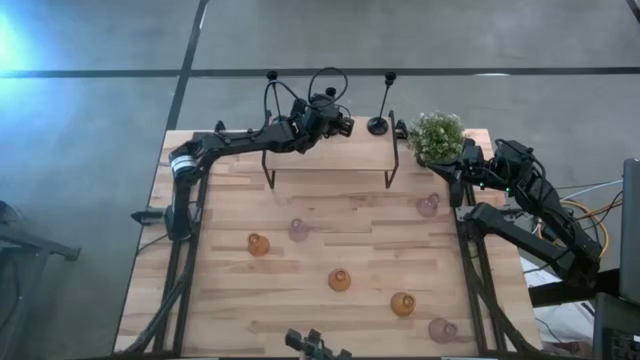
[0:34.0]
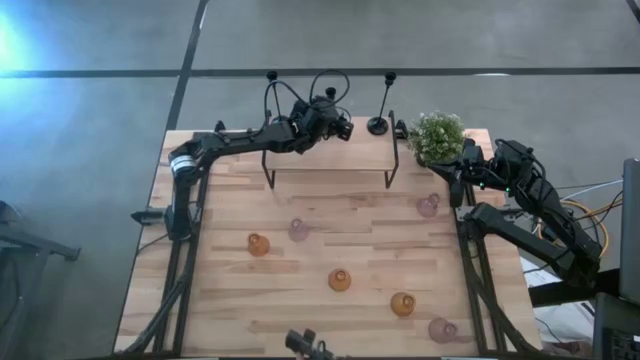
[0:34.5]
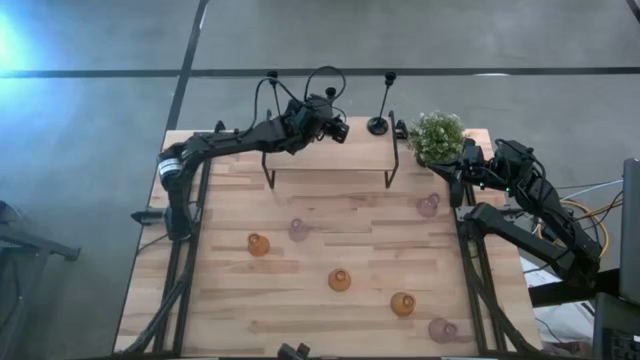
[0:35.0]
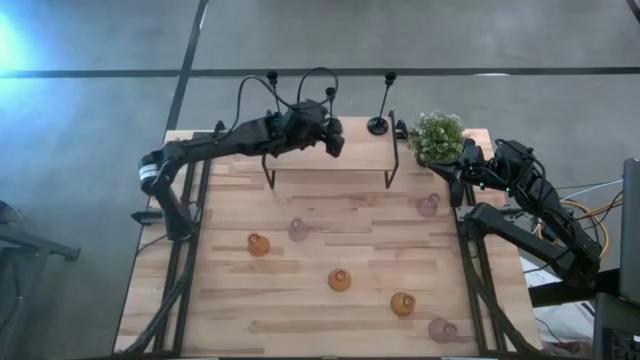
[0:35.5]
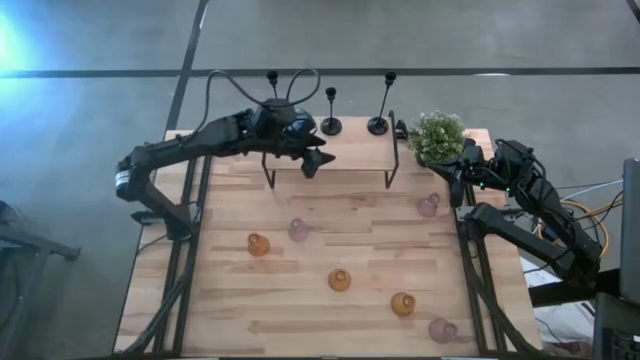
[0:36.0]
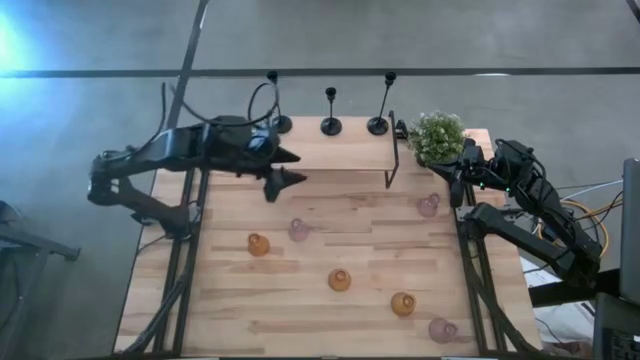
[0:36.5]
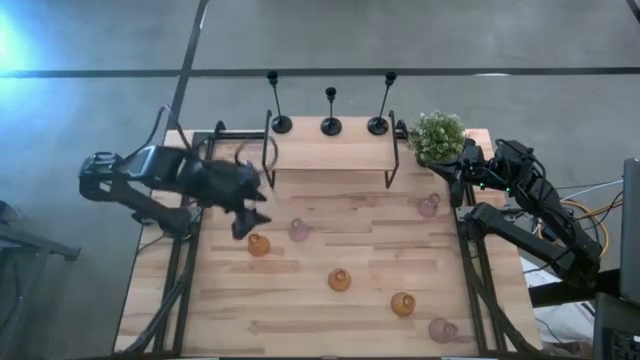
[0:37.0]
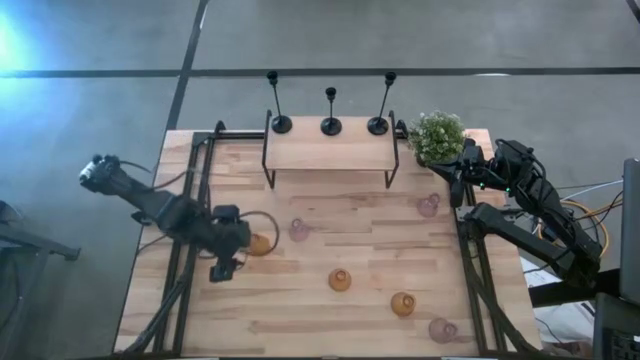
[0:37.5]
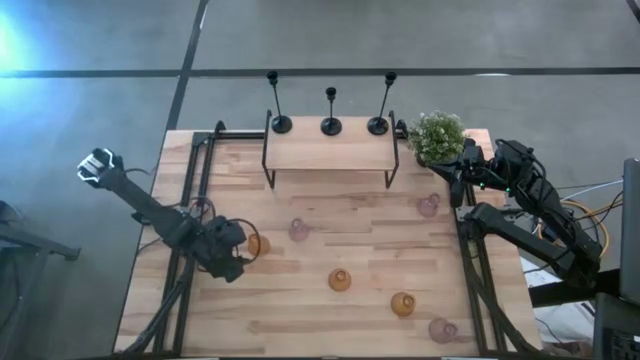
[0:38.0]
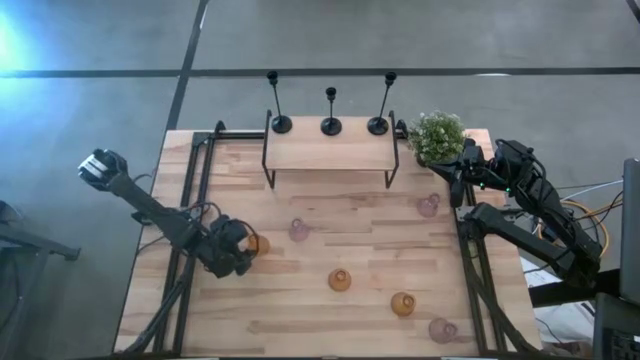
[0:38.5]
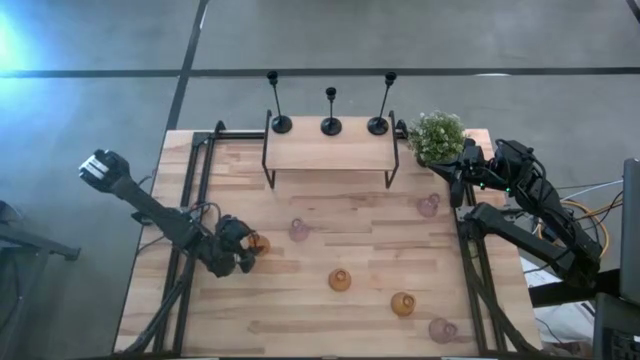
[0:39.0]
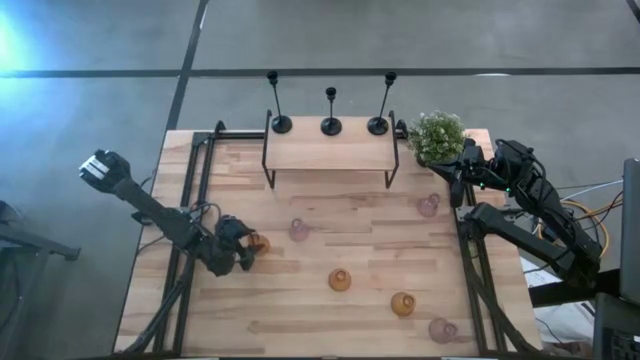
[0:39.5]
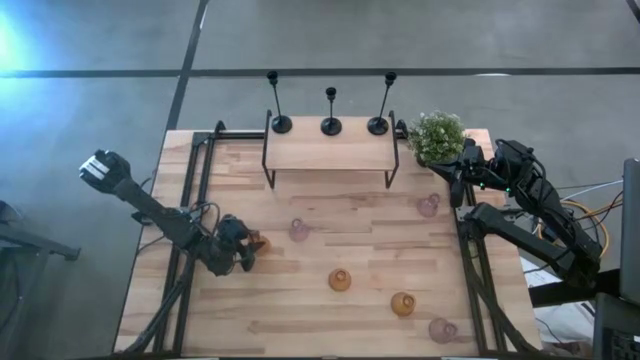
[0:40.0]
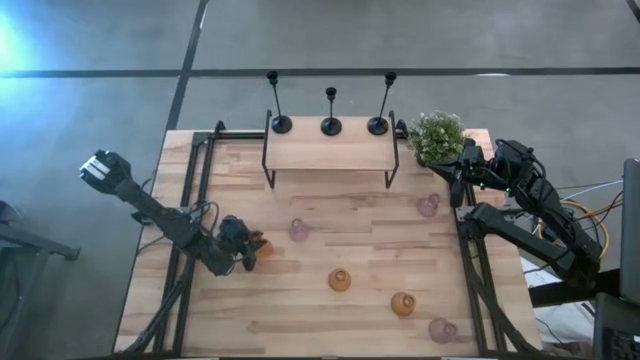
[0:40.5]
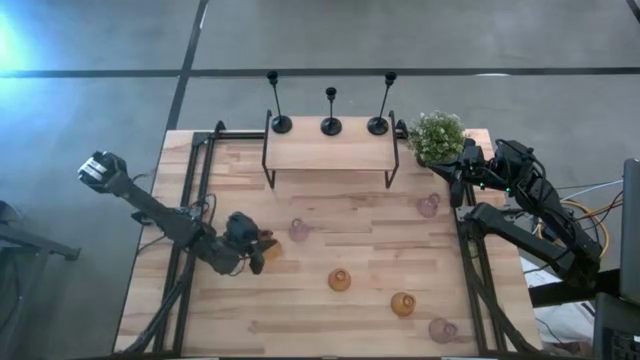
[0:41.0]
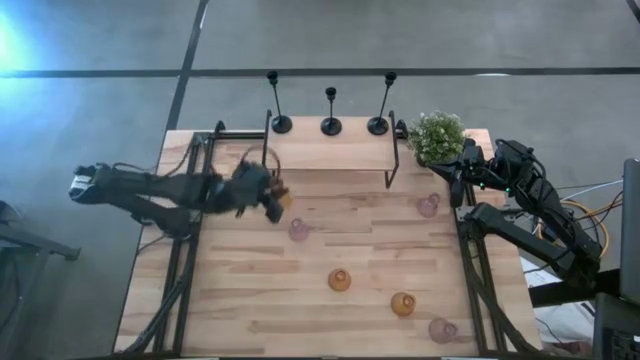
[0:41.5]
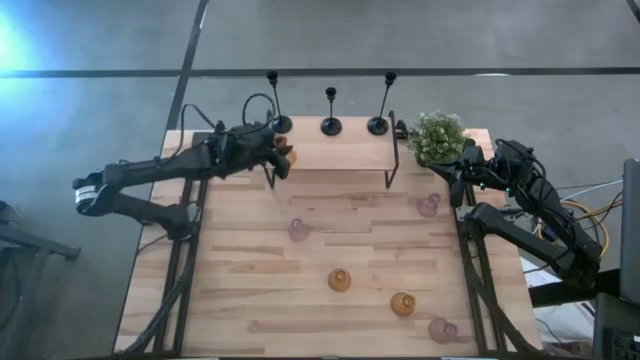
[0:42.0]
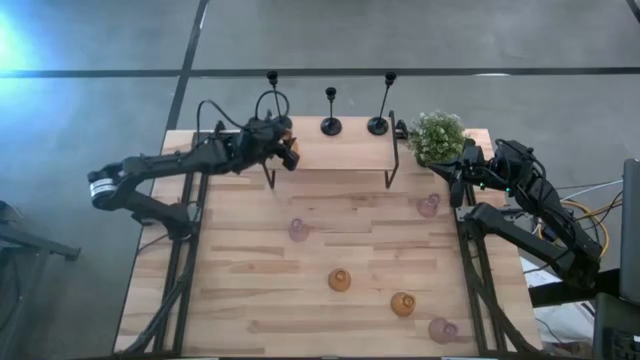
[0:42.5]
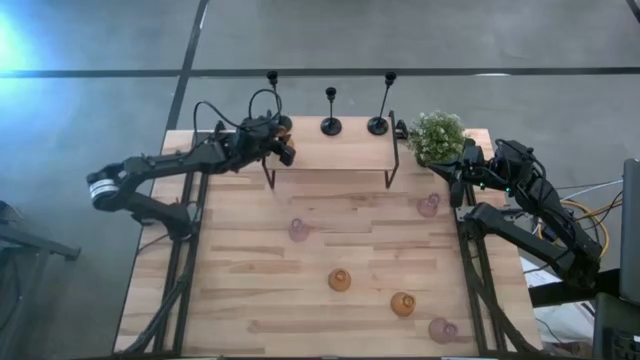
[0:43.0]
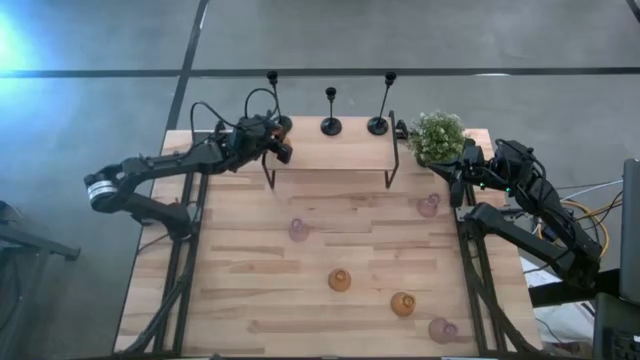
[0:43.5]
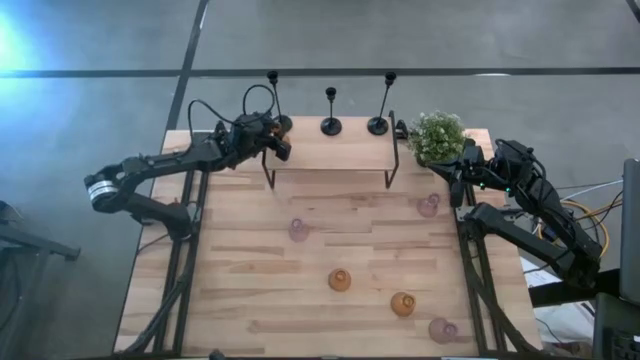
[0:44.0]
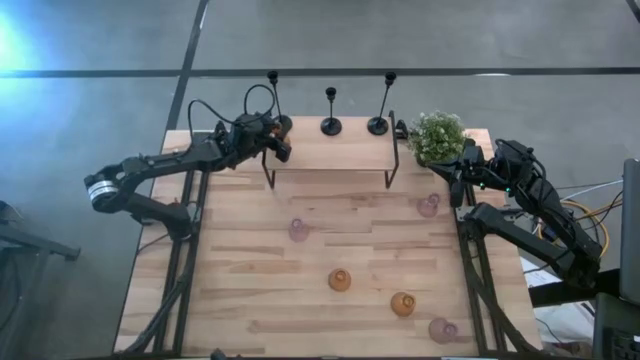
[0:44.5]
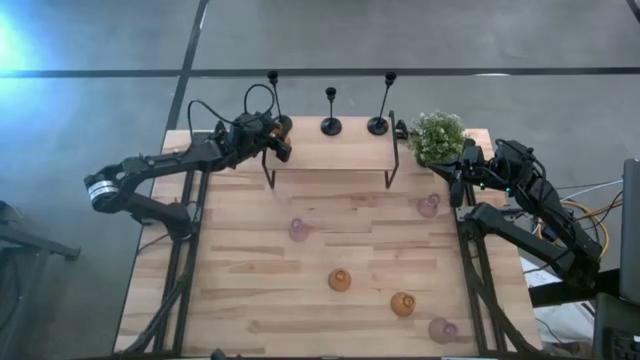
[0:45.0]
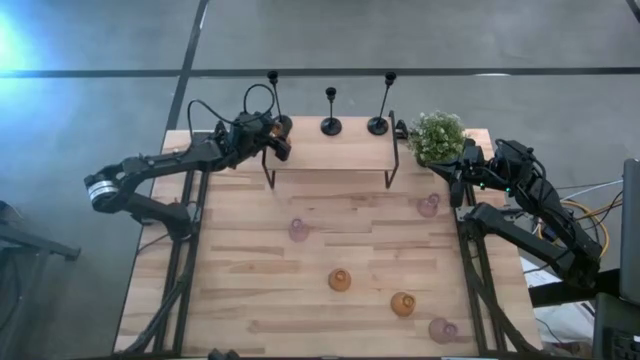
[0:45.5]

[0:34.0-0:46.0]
Task: Pick & Place candle stick holders
Put the left orange glass candle holder on the shelf

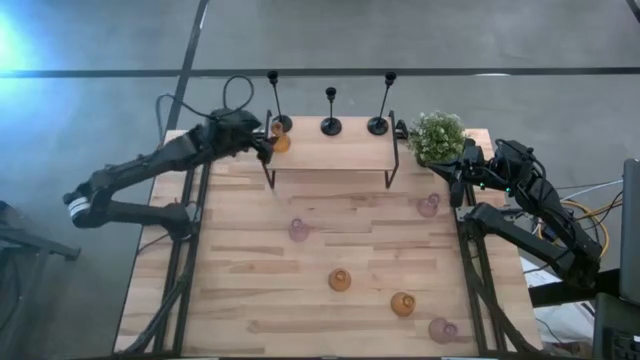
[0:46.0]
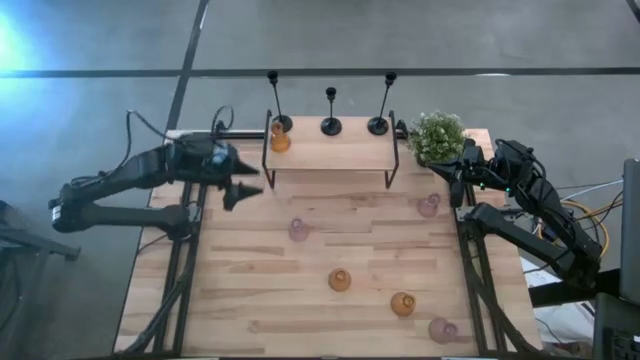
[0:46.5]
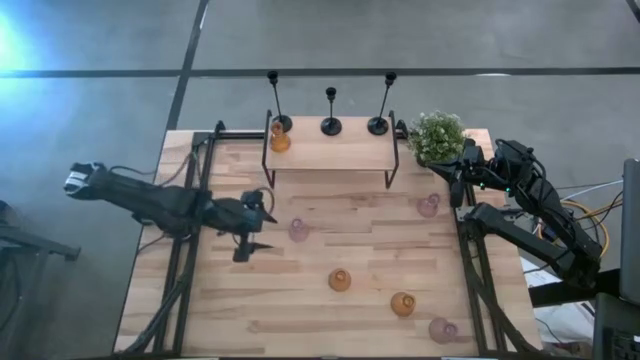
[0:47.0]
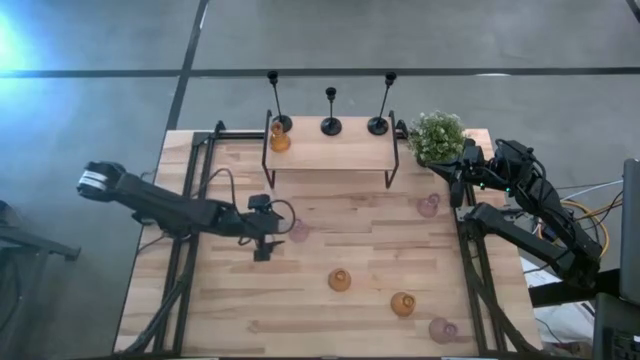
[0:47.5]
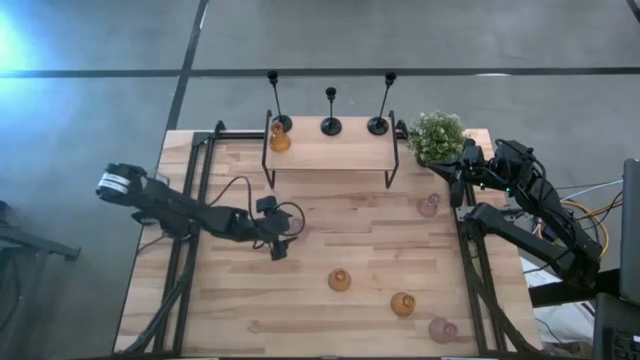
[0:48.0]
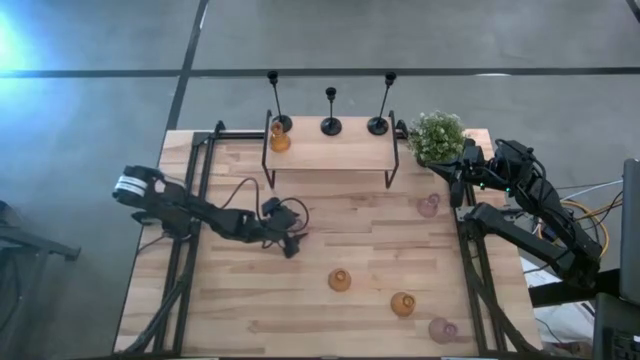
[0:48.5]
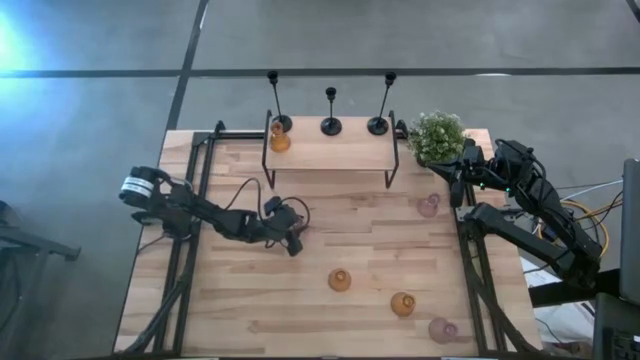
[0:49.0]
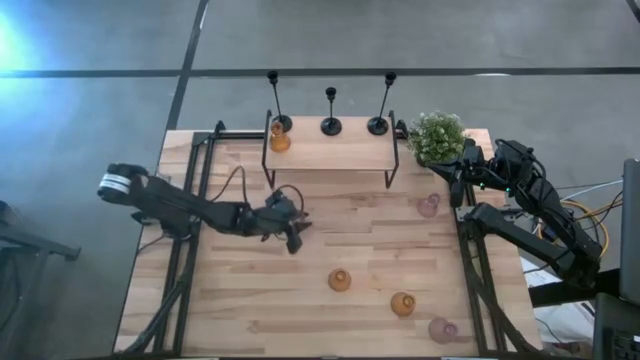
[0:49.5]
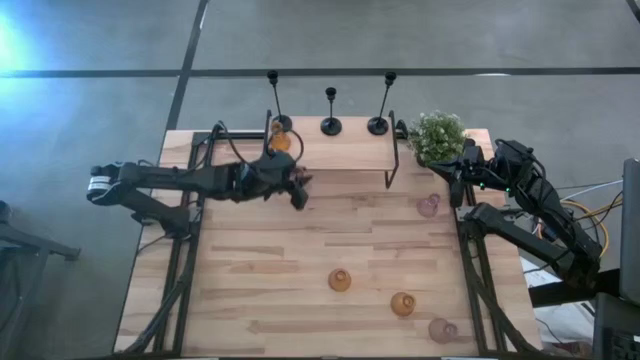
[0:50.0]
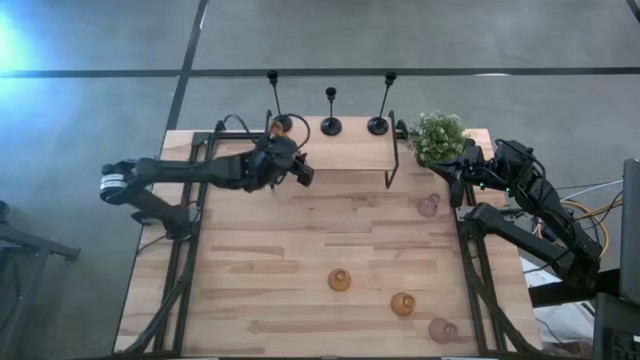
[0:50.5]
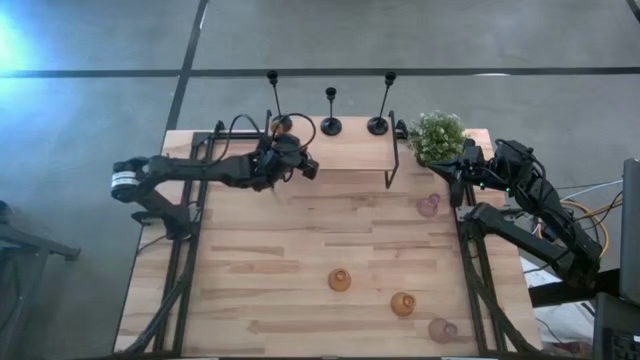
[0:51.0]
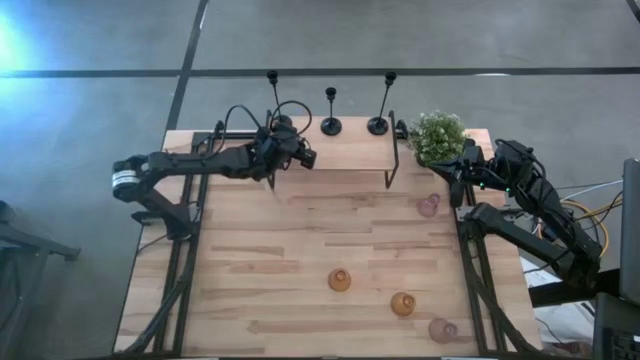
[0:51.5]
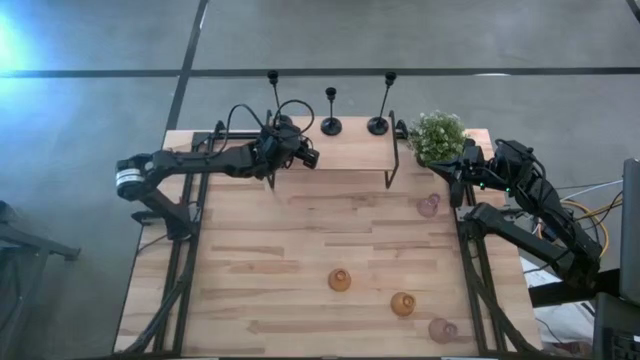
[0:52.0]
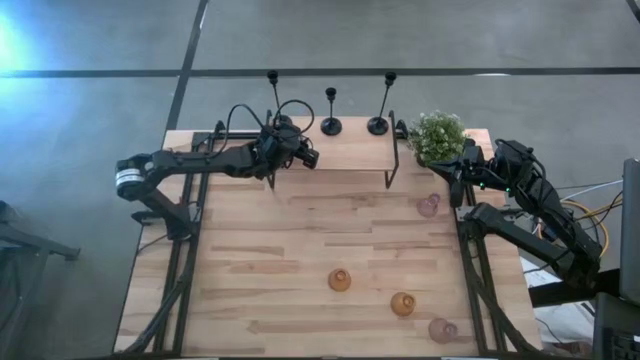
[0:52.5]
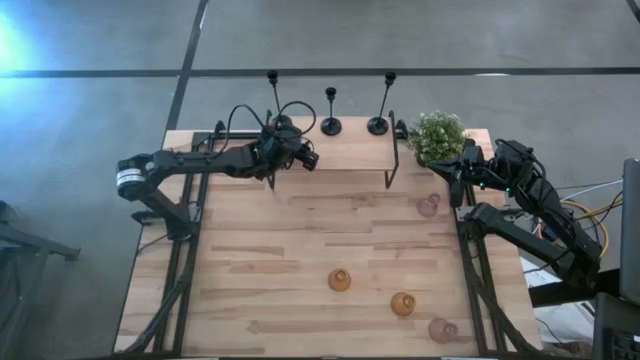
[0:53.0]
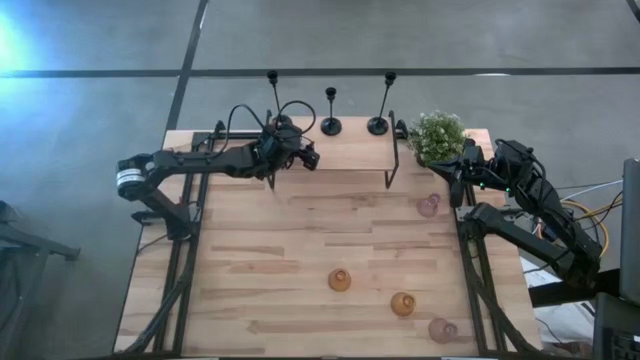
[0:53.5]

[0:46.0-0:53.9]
Put the top left pink glass candle holder on the shelf

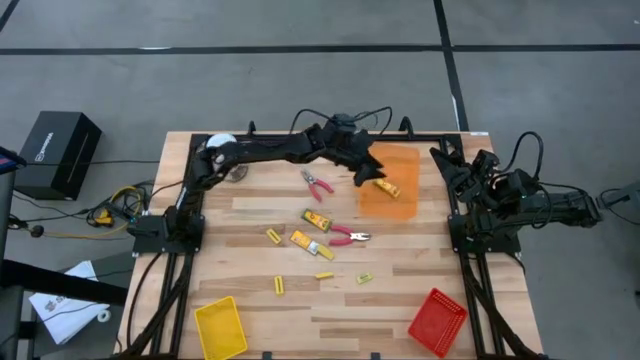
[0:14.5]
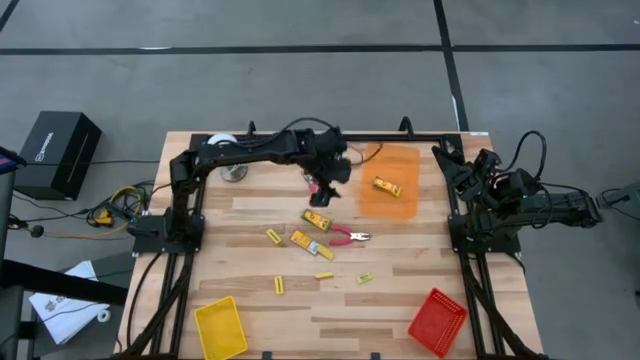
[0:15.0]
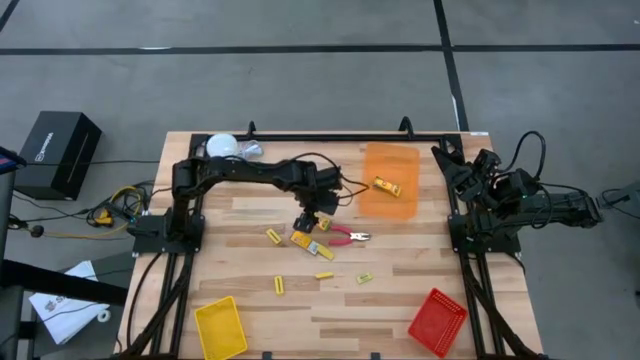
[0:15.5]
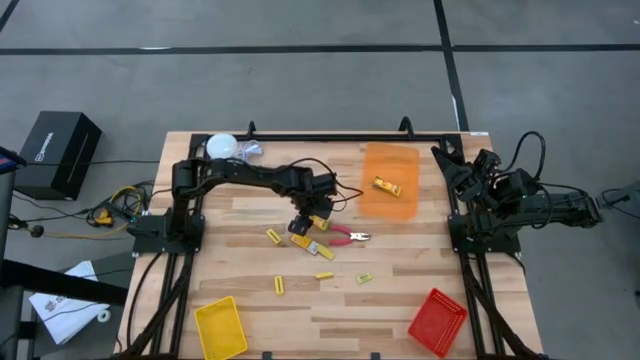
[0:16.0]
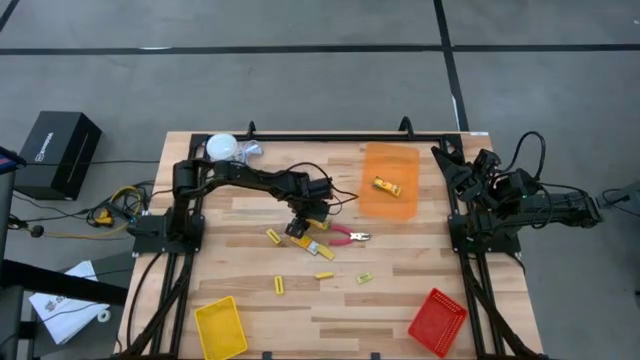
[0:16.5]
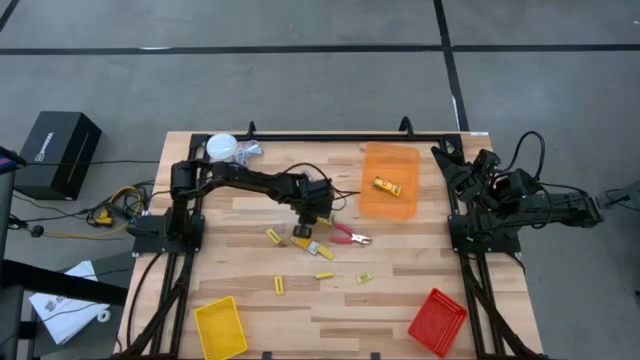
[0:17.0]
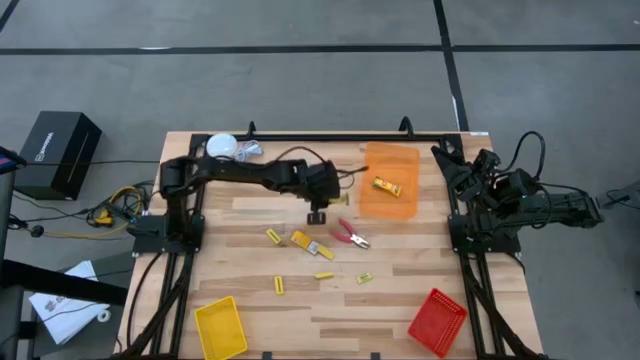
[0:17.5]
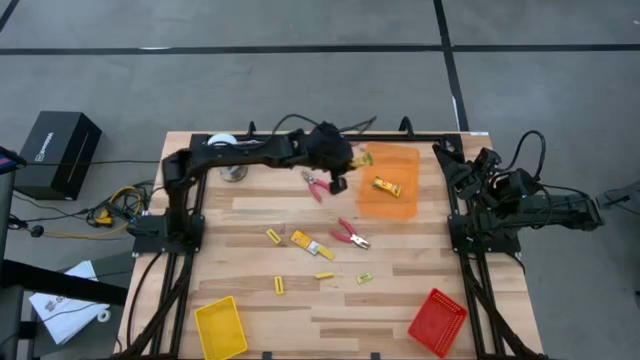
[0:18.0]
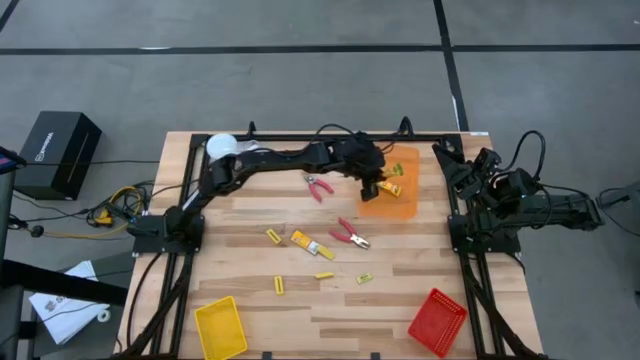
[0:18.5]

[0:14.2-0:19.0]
Task: Pick & Place School Supplies
Put the top yellow crayon bag into the orange bin
